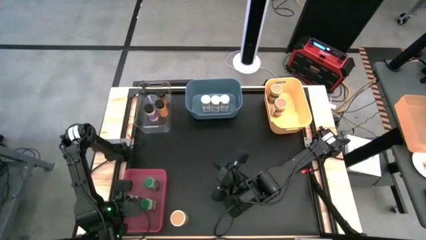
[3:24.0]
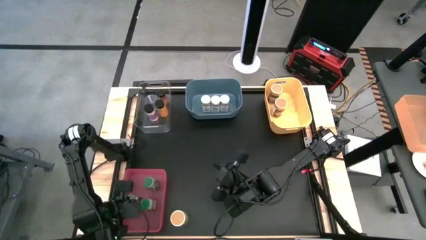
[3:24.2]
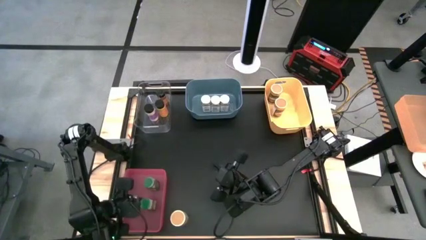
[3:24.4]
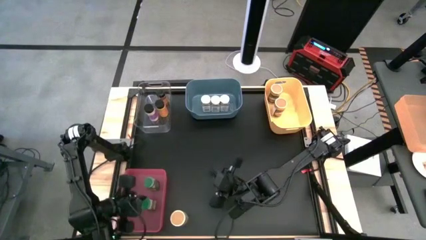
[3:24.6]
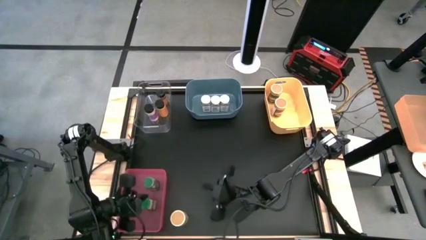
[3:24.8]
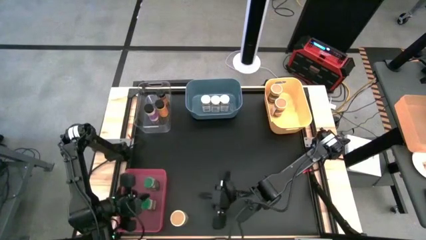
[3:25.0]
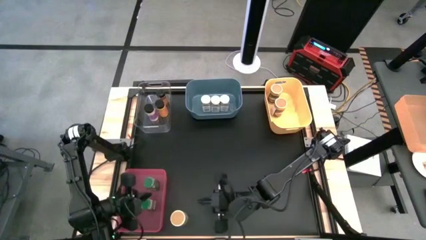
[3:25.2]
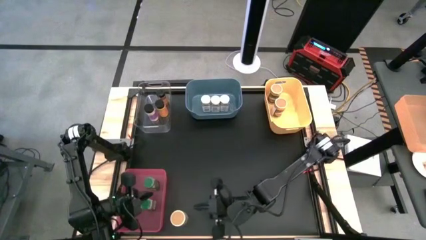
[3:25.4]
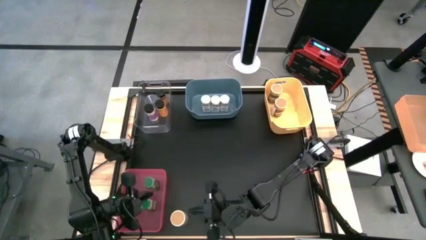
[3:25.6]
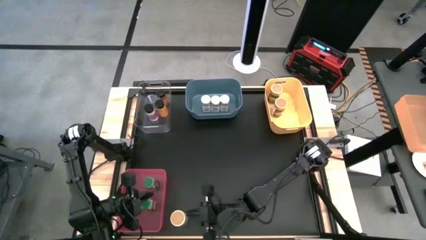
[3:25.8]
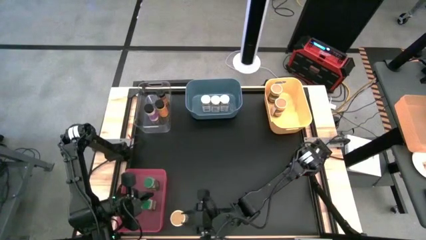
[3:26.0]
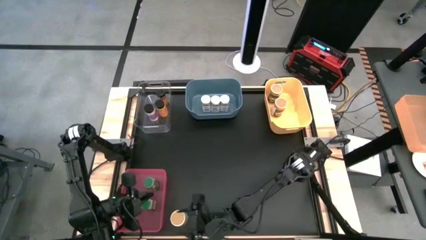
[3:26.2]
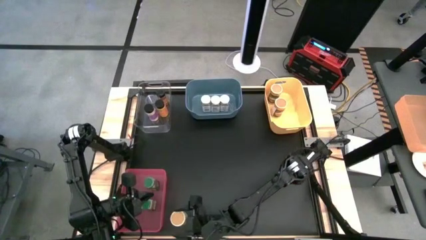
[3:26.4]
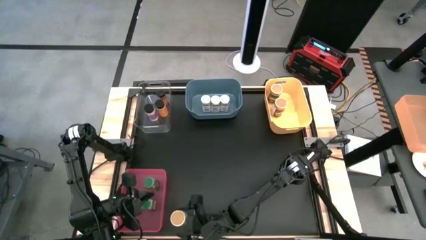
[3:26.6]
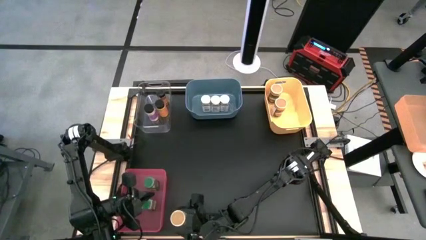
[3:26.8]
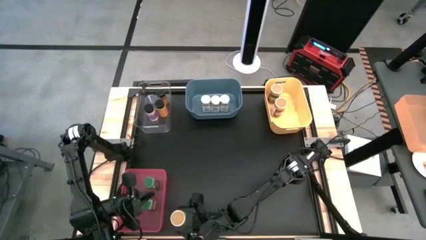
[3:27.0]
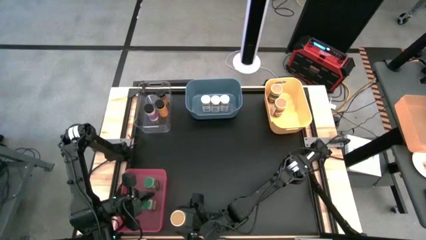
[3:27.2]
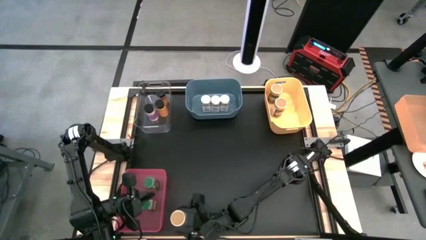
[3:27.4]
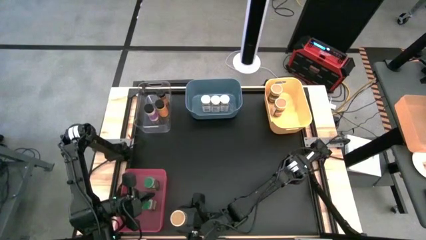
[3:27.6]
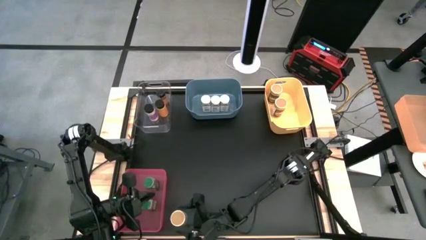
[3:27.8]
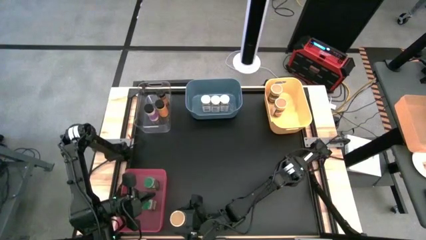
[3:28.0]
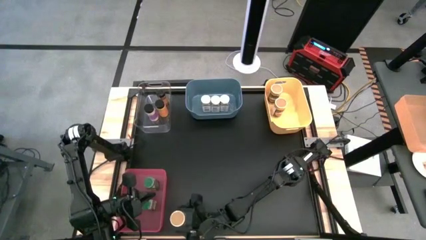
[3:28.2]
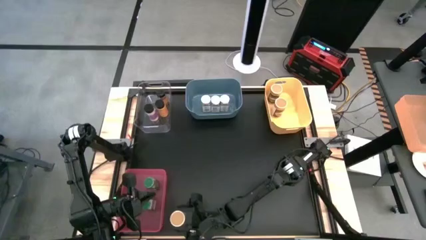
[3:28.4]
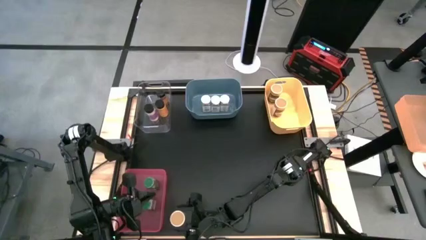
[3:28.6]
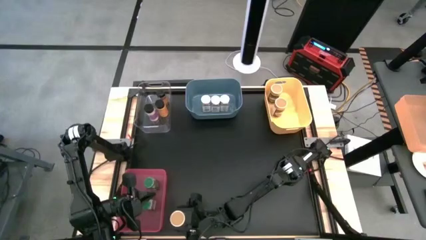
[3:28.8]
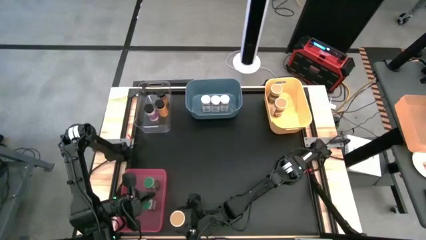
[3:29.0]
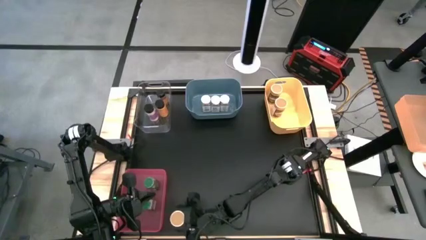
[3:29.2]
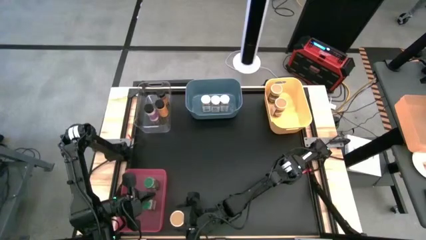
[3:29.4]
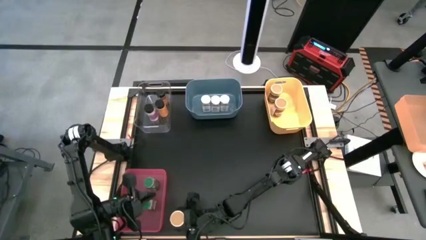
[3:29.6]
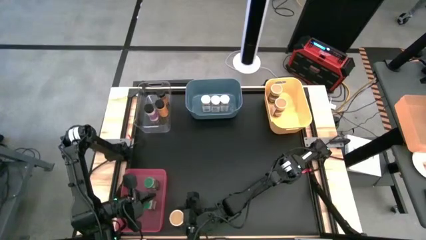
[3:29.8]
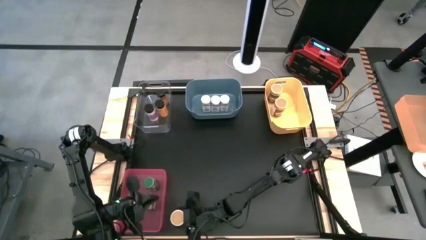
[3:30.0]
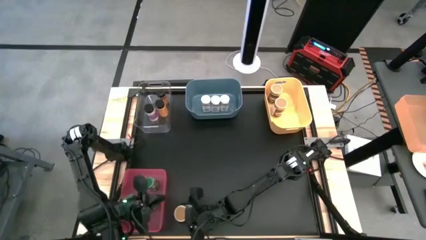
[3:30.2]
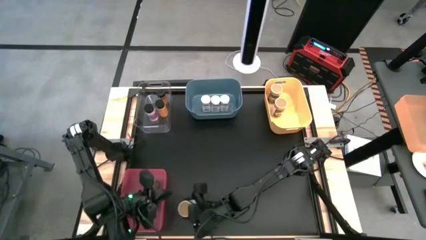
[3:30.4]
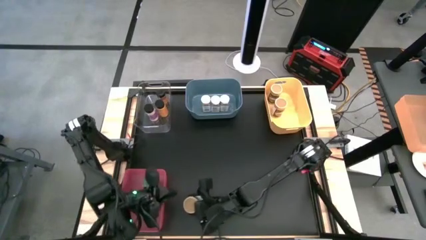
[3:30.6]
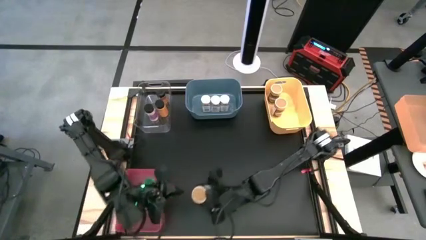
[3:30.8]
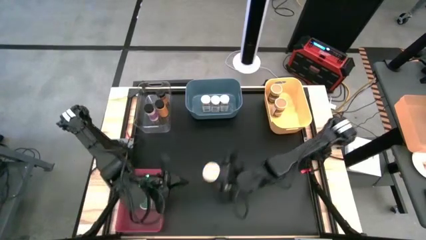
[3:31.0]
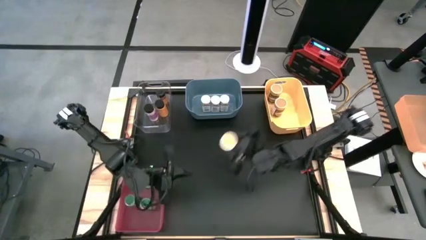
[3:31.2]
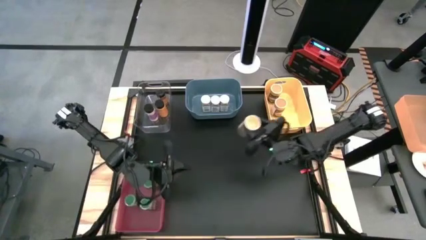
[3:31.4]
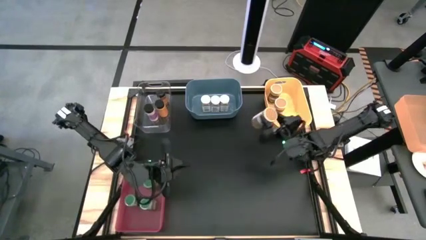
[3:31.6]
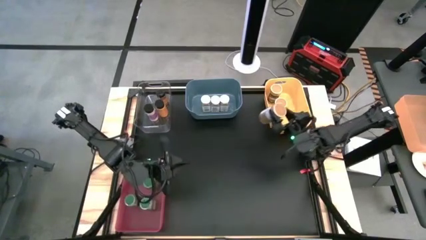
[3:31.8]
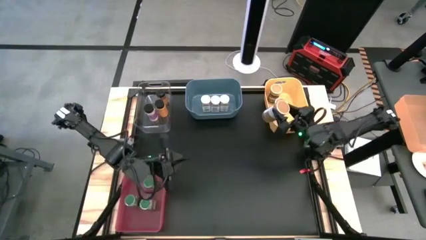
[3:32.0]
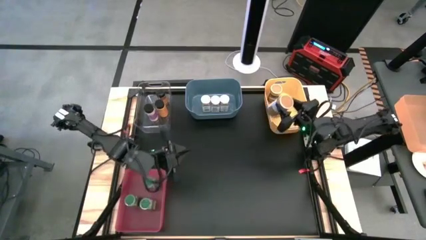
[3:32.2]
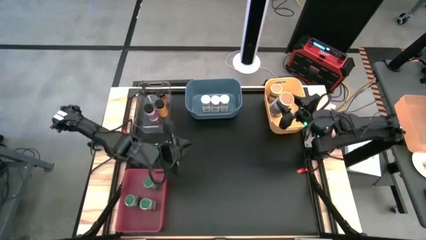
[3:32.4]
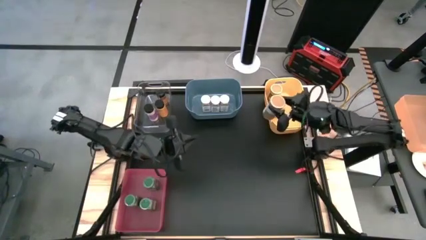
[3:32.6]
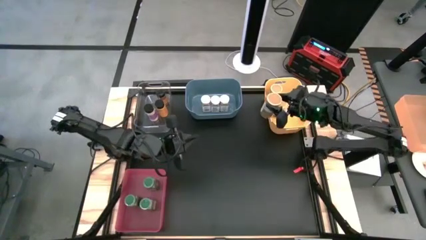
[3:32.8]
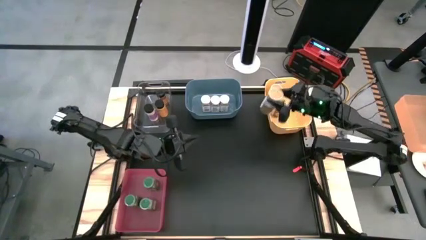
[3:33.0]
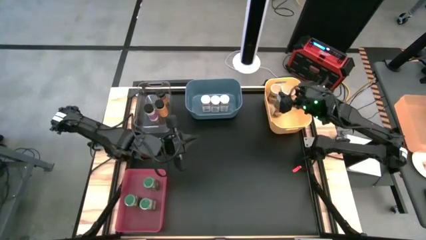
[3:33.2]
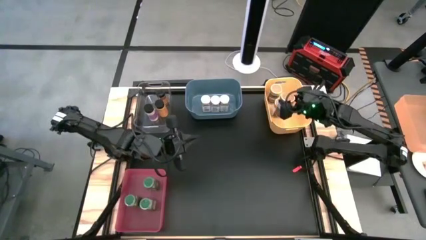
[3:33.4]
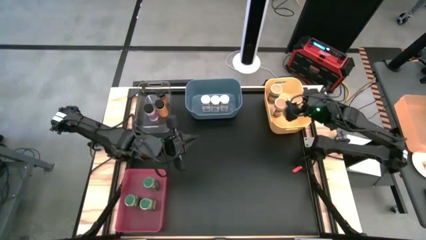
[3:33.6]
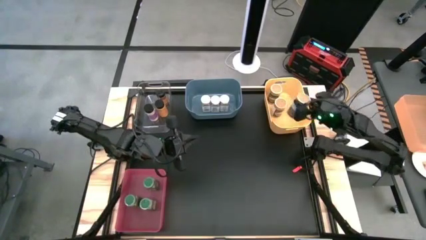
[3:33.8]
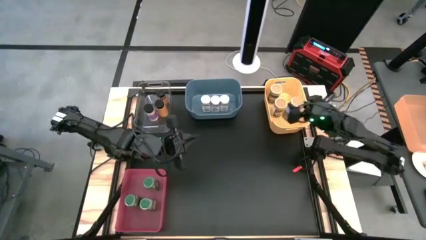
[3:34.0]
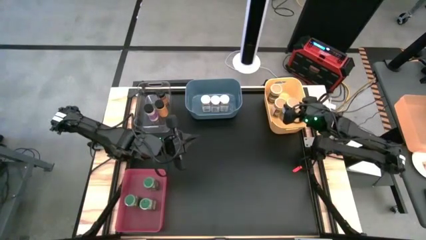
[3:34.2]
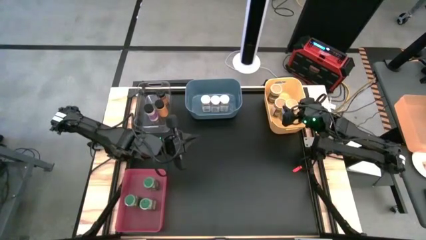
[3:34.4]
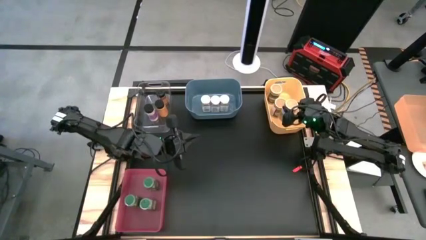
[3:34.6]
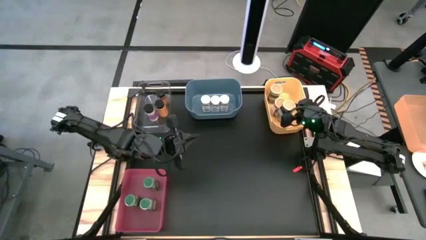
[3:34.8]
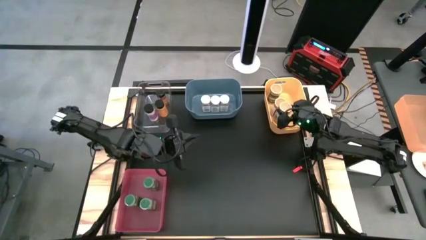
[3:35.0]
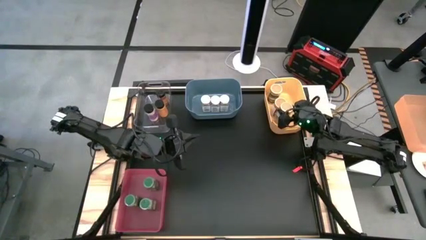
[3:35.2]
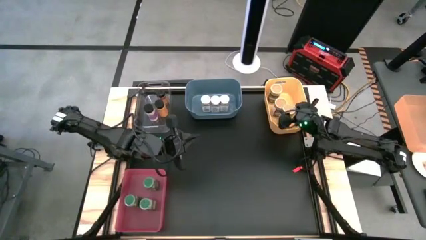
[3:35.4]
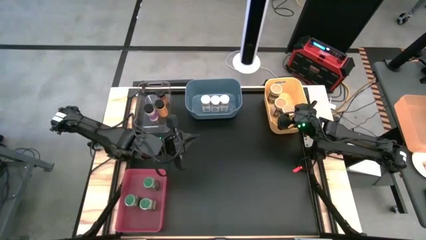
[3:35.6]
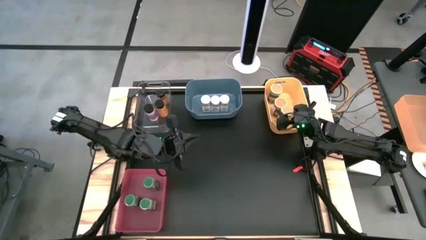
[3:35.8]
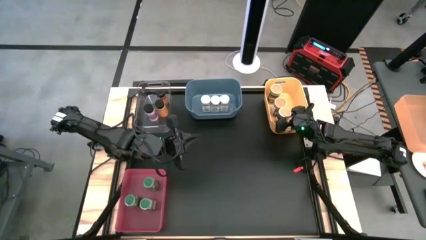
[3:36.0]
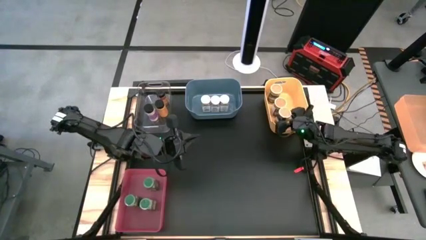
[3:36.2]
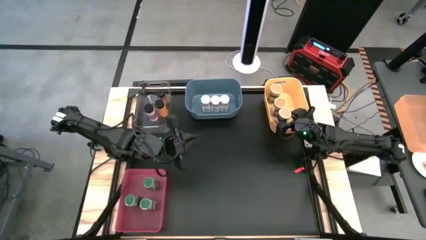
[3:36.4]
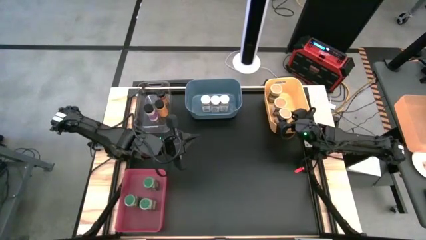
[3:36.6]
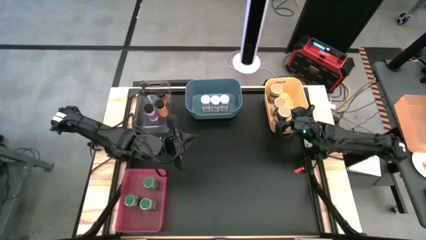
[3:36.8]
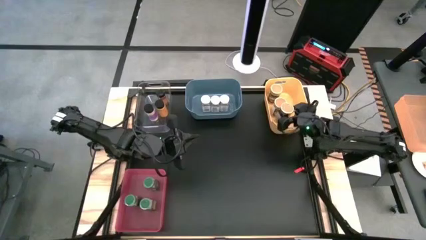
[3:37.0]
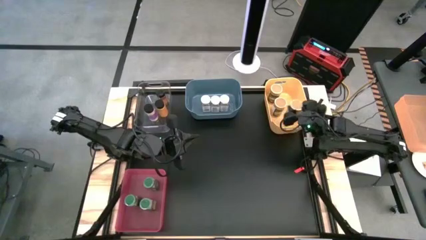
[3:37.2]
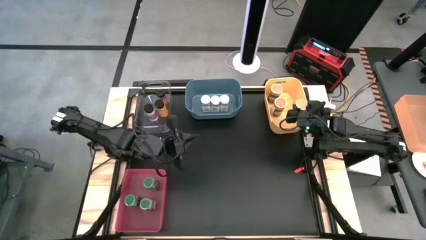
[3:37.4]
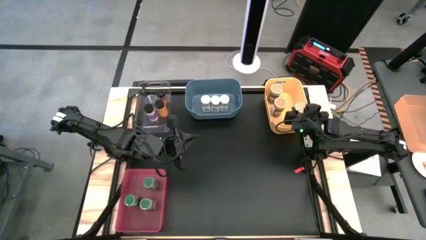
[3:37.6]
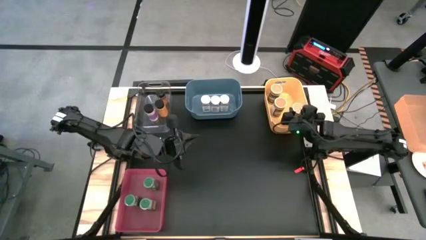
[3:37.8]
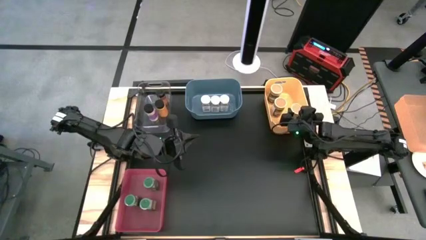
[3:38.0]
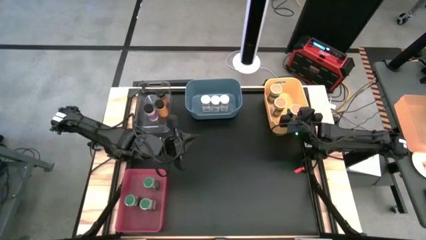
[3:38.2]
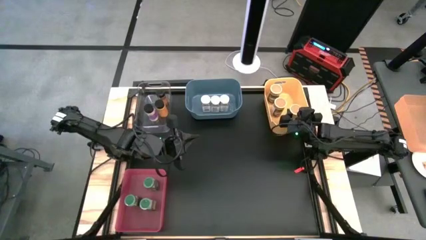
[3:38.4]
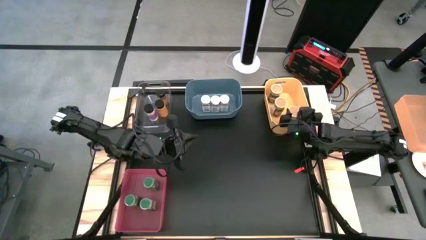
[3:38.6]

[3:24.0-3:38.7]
Task: Sort spices by type
Put the gold seasoning bottle into the yellow bin

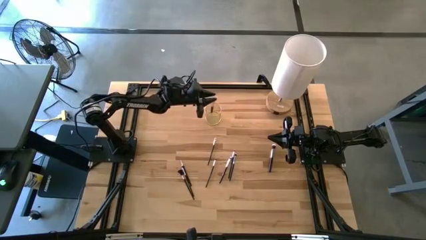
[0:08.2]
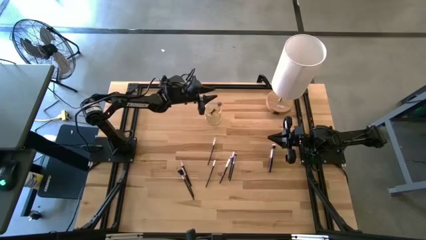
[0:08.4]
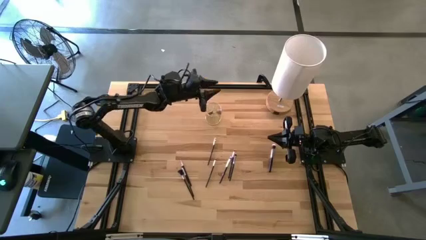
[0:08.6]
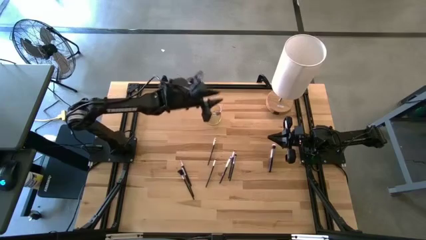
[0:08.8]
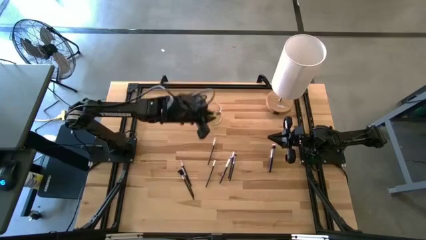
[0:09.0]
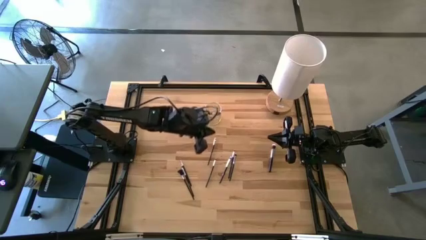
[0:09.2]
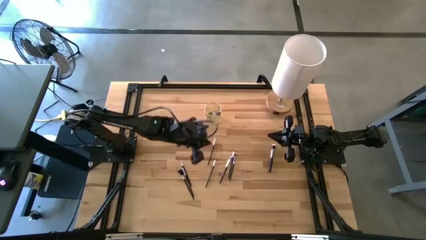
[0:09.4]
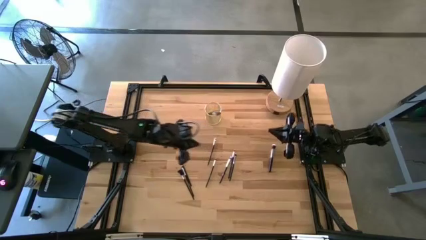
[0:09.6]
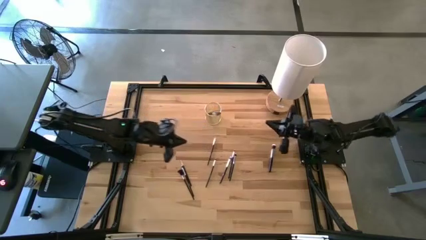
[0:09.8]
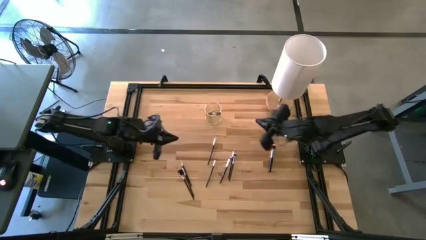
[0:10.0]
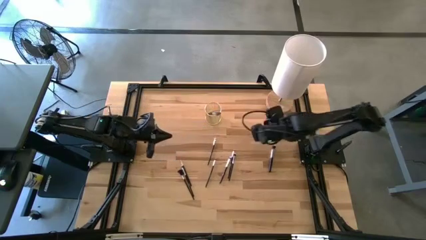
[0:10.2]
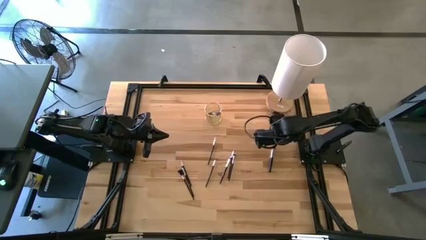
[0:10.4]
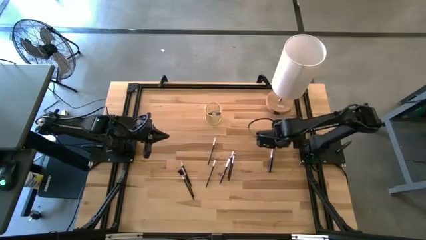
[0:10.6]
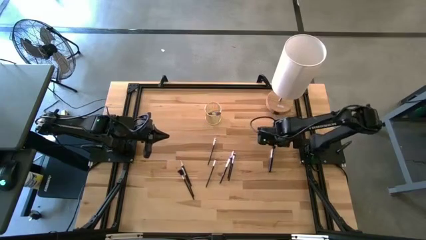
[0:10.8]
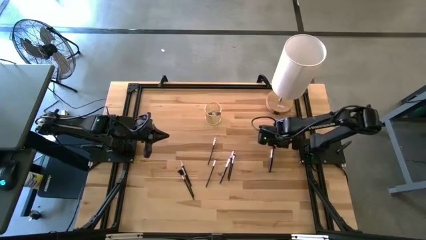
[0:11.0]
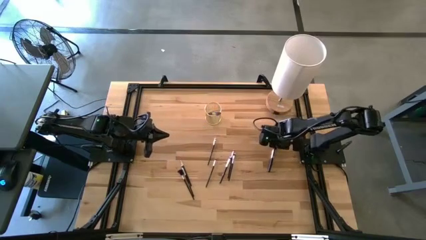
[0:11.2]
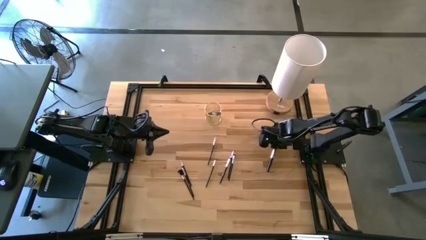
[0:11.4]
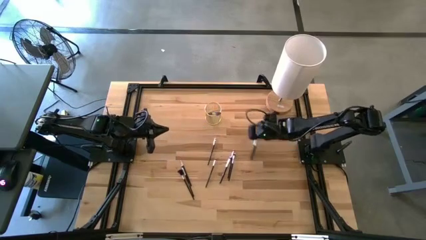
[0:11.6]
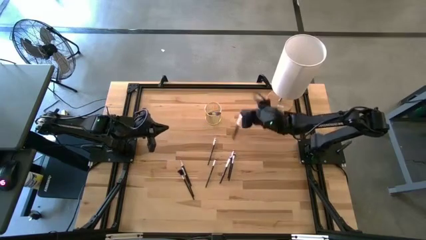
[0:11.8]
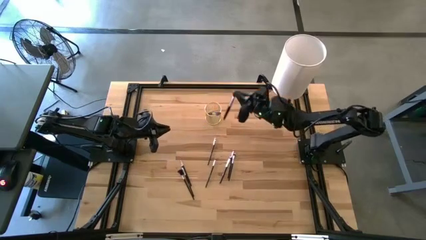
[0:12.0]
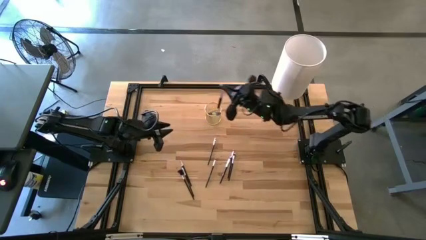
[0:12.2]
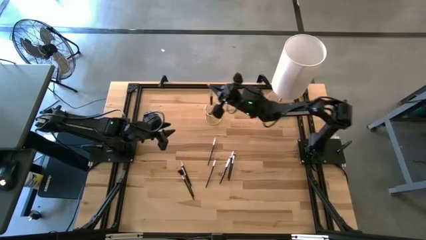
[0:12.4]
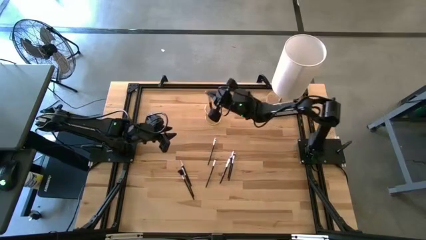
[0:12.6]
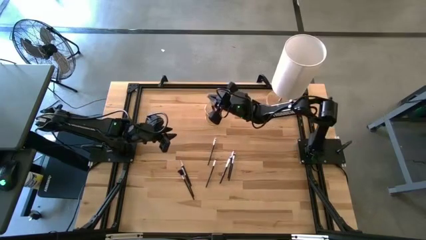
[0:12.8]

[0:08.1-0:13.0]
Task: Put items in baskets/containers
Put the blush brush into the pen holder
